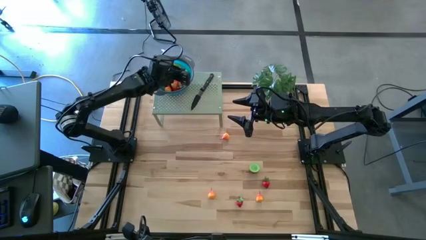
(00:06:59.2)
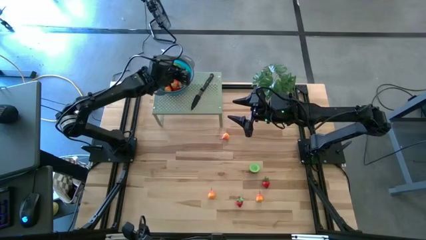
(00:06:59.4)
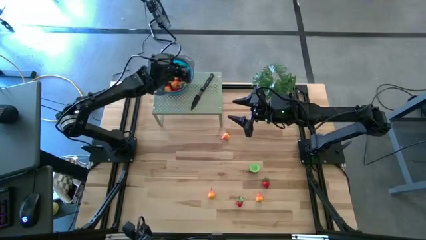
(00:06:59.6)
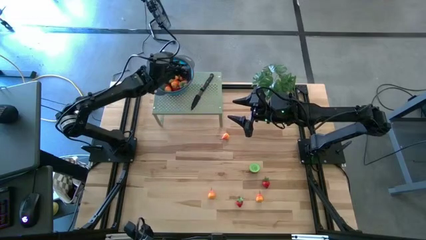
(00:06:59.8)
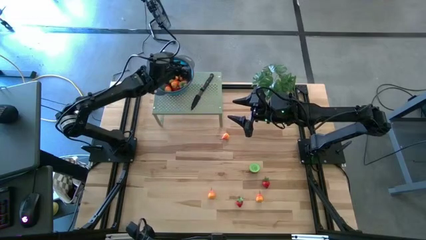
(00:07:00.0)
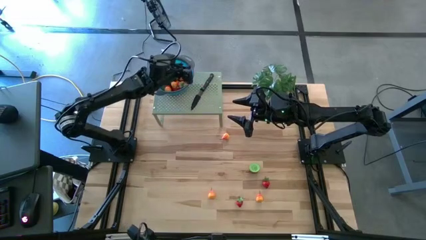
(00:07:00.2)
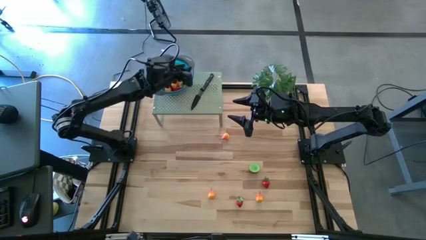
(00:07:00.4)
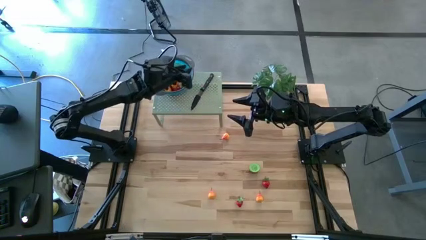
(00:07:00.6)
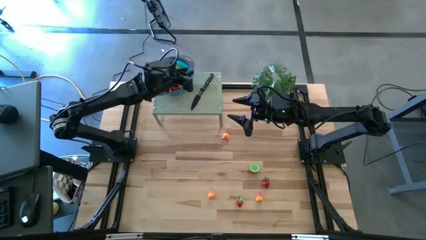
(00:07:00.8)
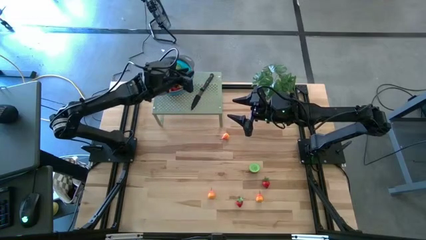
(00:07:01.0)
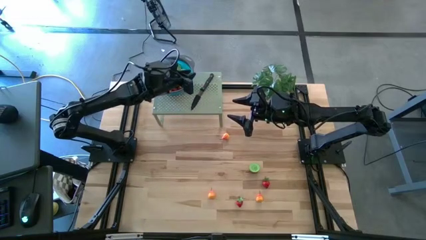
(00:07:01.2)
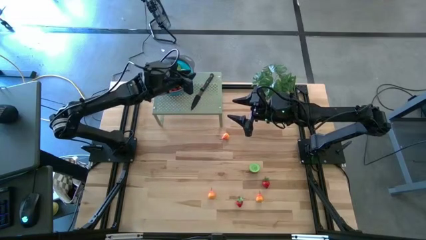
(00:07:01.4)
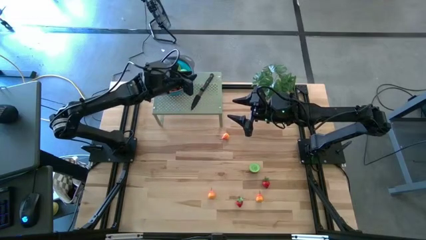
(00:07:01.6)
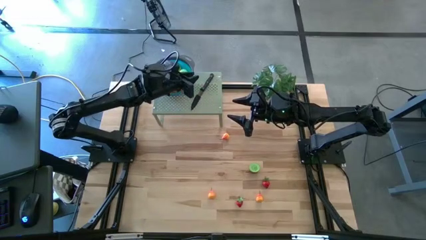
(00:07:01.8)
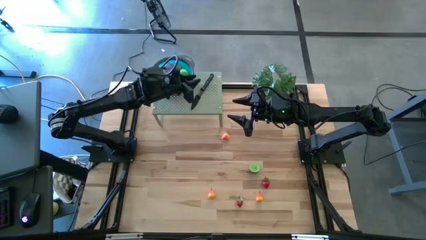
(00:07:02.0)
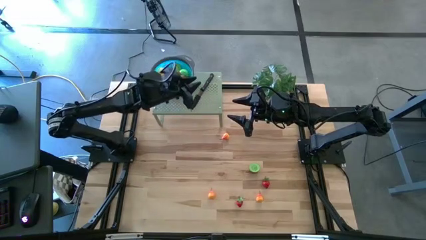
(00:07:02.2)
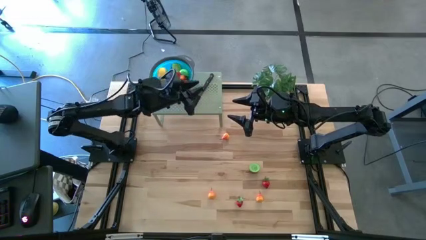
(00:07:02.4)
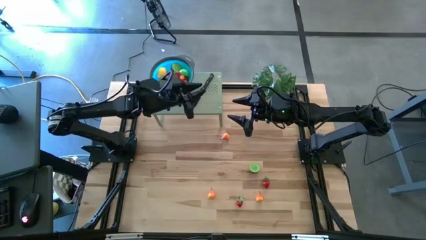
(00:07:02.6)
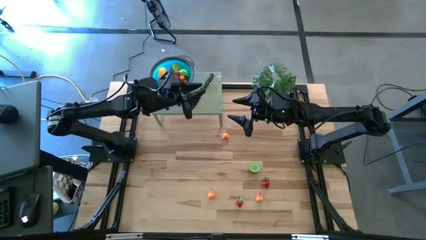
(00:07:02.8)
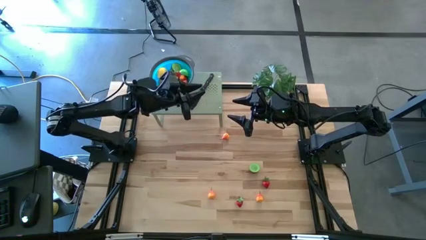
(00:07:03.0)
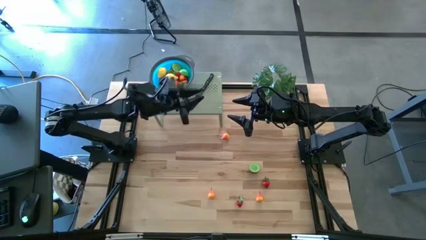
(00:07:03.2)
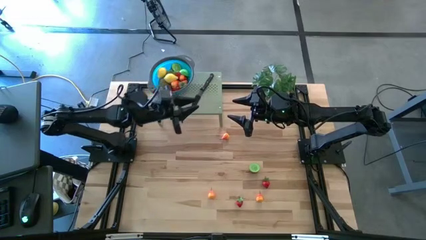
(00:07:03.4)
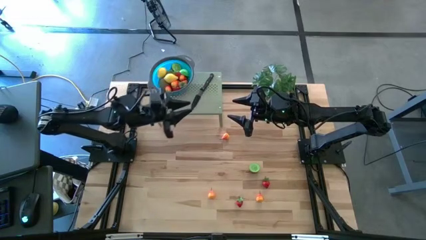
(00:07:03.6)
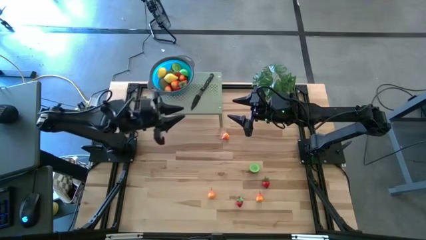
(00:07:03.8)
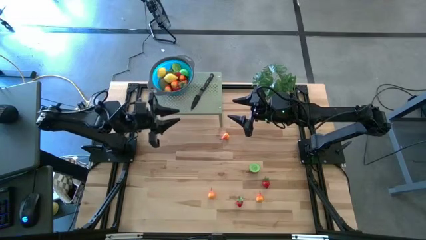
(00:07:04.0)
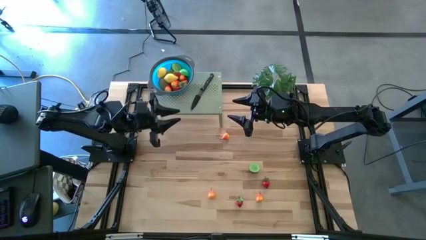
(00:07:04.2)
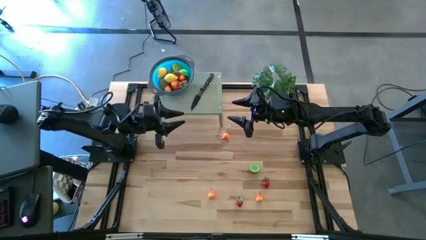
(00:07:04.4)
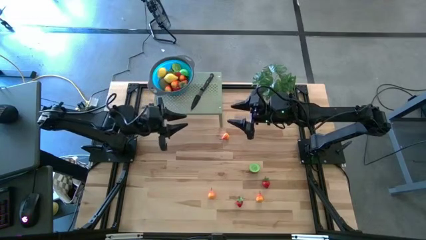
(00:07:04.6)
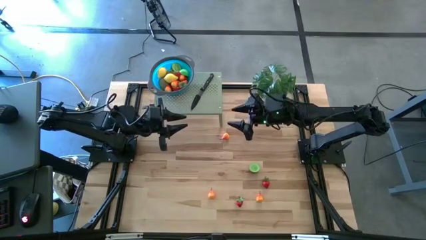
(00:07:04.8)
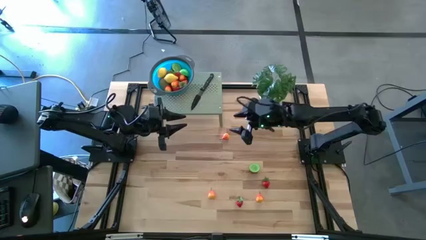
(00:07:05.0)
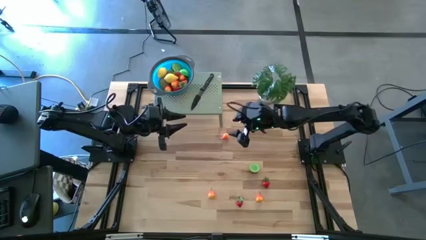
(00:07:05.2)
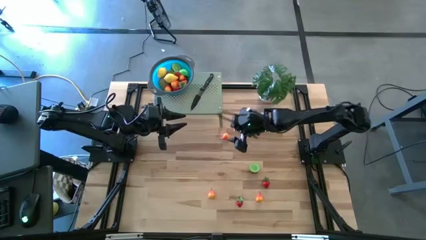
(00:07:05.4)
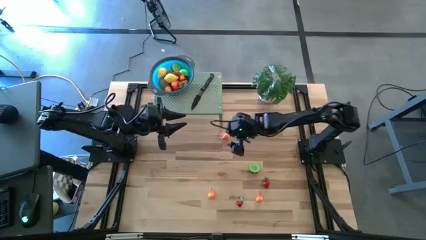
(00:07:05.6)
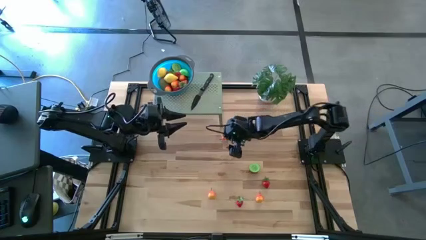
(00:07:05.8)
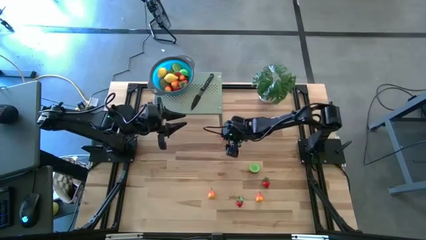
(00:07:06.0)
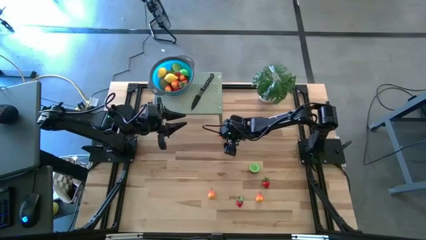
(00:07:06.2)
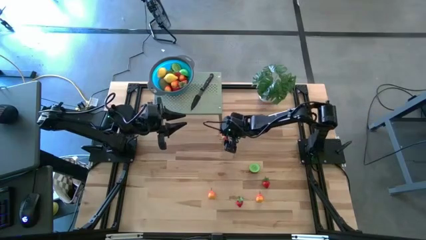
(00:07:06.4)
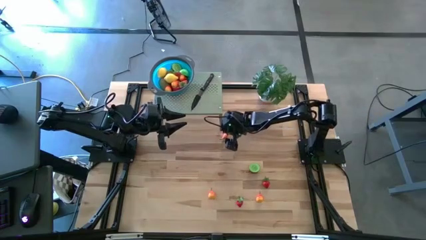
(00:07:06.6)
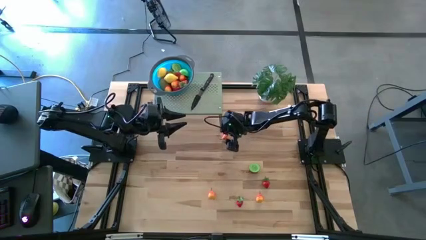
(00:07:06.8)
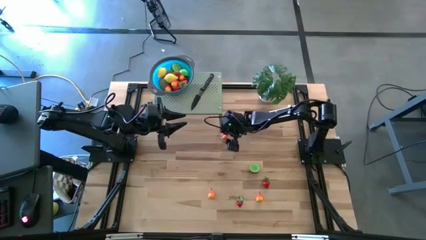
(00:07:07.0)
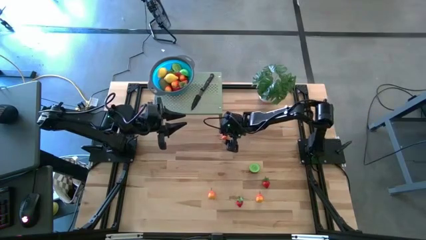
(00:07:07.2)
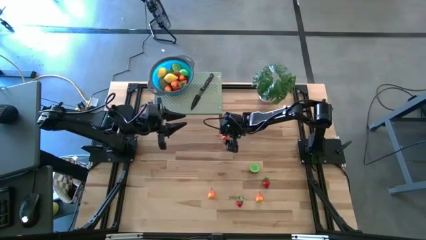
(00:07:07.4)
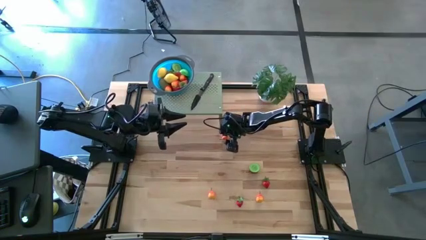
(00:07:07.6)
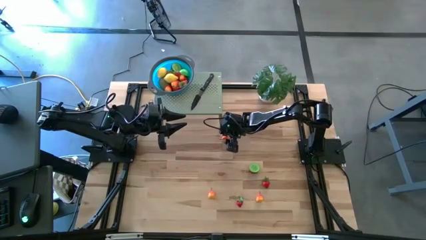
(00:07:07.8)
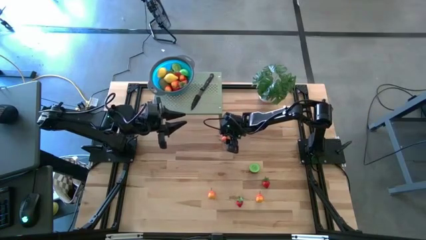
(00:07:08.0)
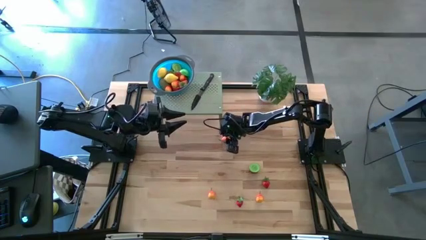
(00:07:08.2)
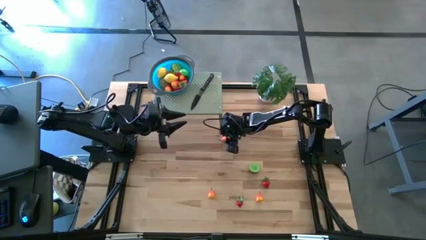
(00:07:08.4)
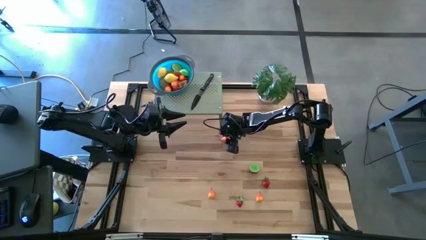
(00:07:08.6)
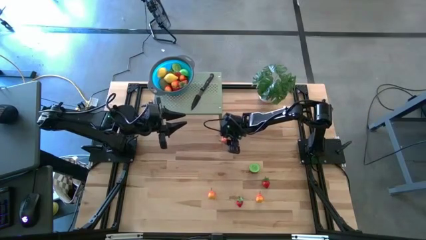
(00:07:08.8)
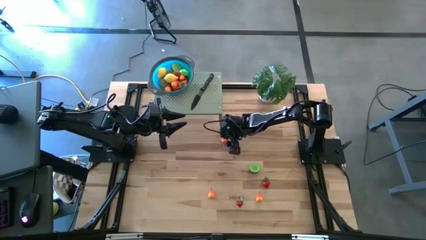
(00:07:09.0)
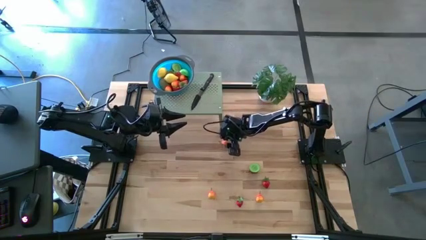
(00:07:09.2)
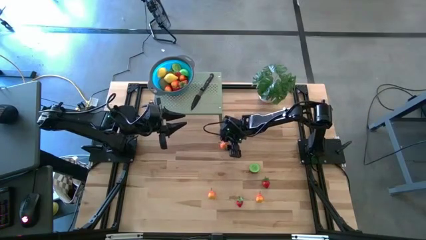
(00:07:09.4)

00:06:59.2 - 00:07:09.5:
Task: Pick & Place Fruit
Put the orange pear into the strainer bowl on the shelf

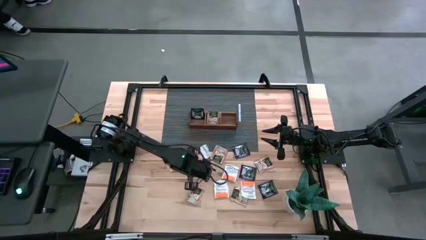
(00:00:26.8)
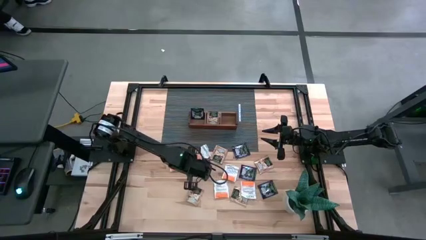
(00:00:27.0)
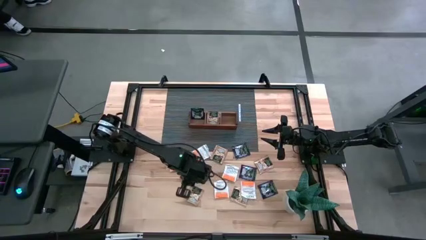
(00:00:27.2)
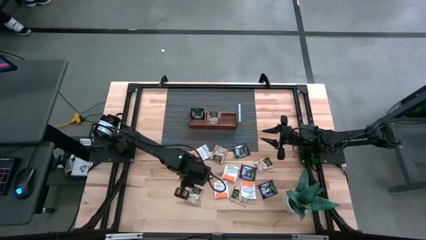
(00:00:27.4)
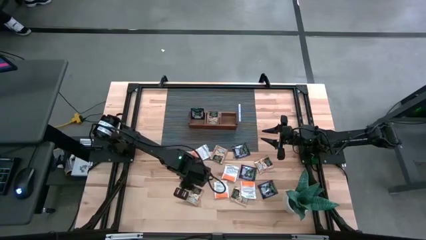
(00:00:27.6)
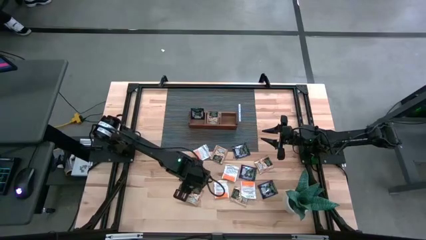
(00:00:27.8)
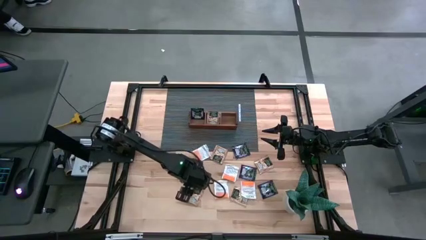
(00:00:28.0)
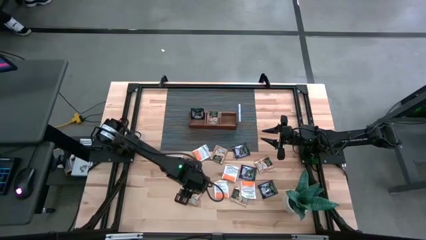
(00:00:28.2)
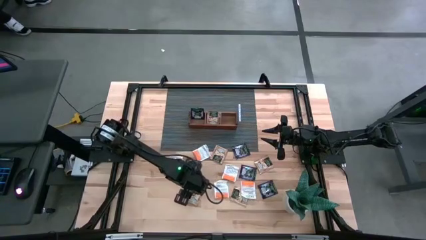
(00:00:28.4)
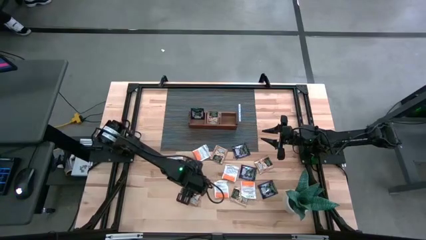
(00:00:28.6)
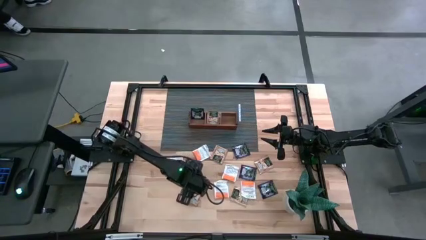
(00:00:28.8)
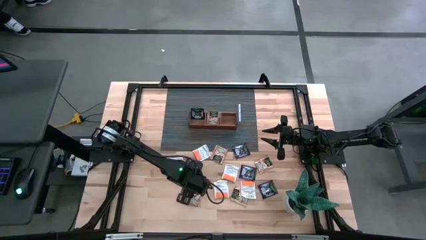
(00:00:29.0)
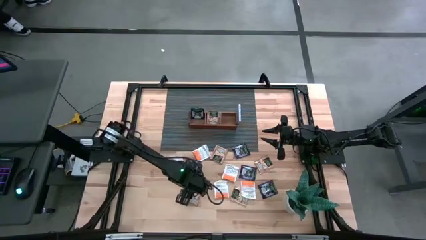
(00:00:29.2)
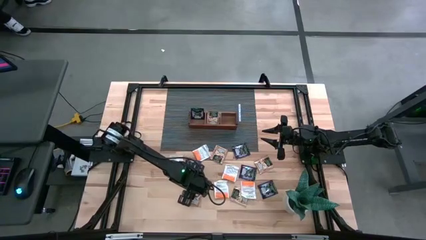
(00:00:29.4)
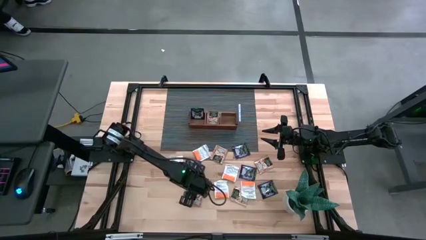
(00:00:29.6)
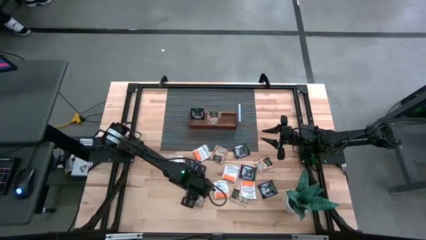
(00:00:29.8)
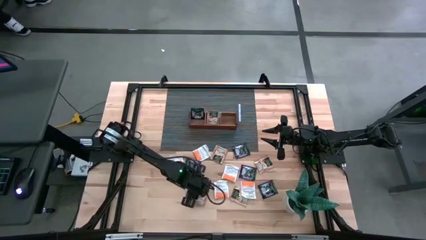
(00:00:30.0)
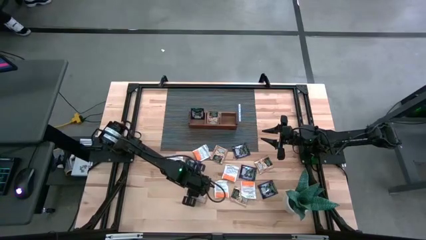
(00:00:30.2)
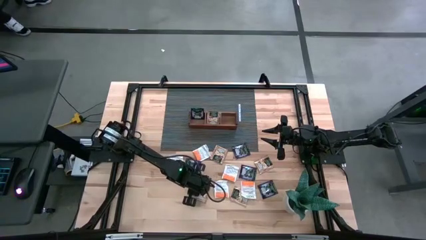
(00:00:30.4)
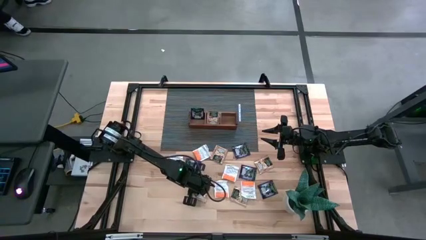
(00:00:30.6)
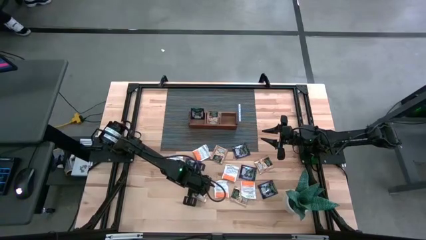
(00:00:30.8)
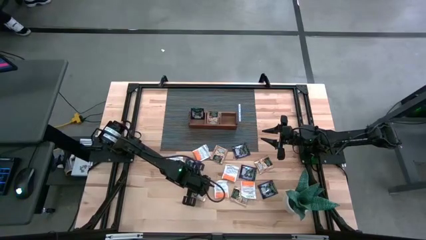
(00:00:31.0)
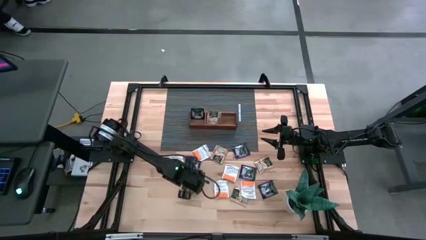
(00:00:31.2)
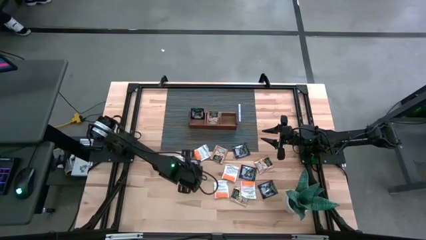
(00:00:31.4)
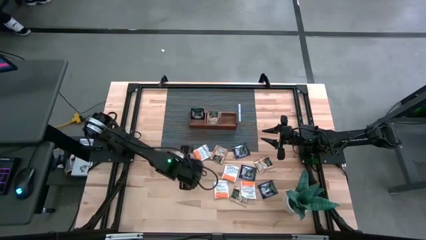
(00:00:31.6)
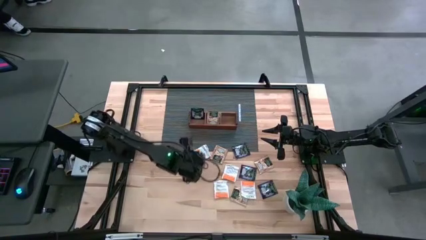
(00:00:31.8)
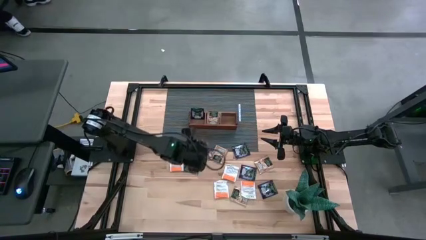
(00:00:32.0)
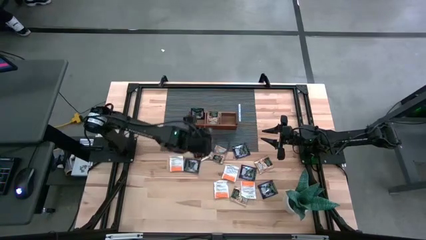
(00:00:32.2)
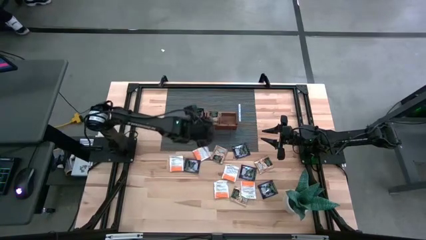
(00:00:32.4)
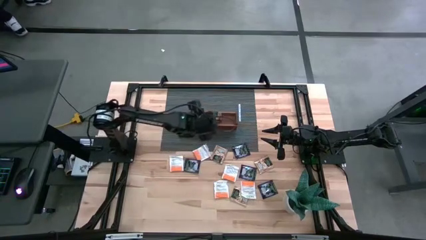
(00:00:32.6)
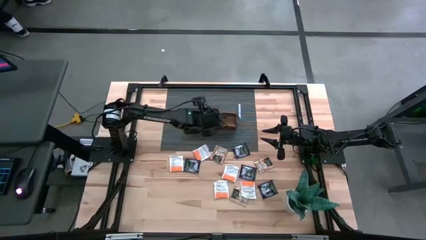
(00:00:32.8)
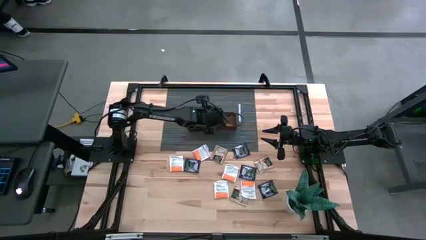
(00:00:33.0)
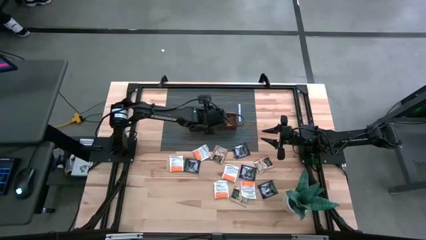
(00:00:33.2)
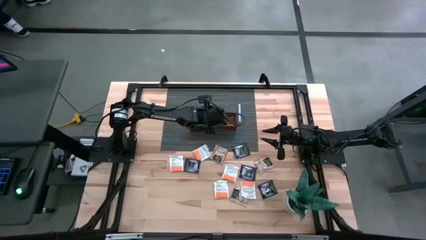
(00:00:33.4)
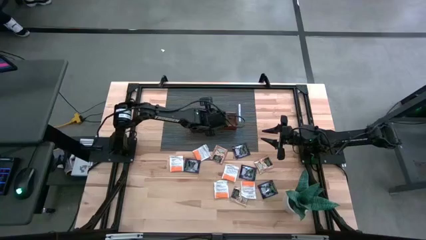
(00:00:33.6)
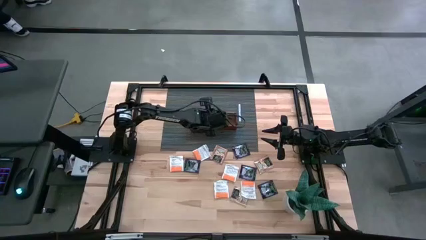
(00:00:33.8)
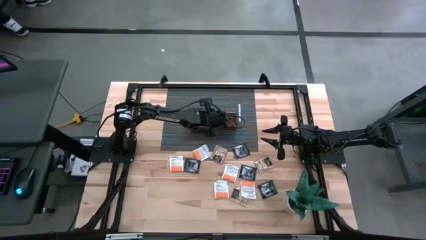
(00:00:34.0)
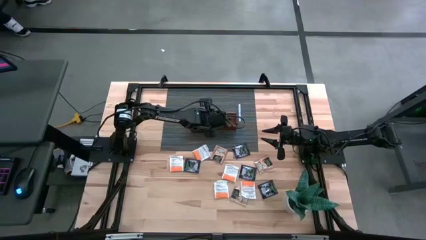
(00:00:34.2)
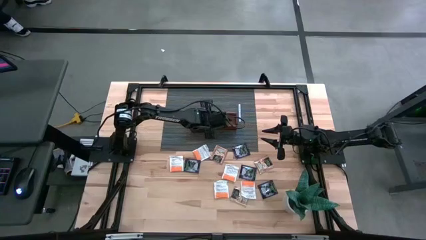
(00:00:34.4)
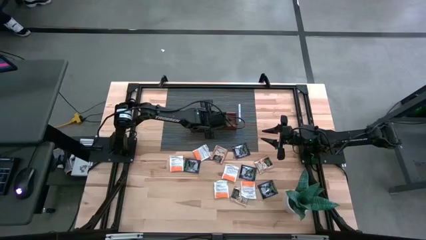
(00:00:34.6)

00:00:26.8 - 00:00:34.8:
Task: Pick & Place Tea
Put the brown tea bag into the middle section of the wooden organizer
